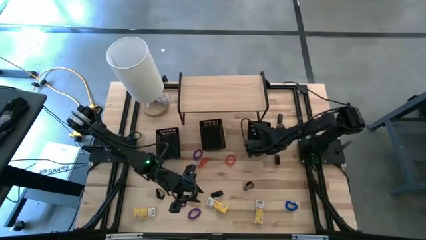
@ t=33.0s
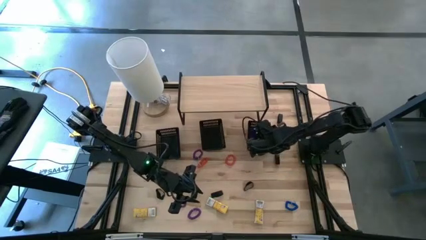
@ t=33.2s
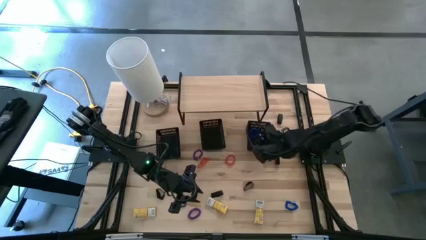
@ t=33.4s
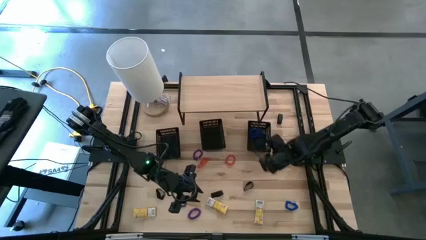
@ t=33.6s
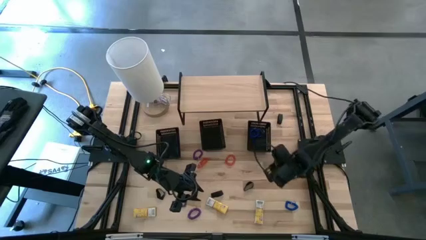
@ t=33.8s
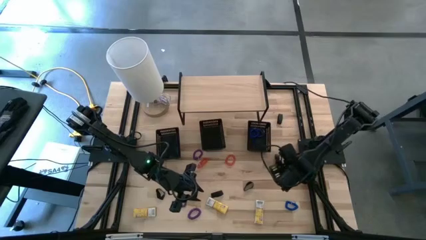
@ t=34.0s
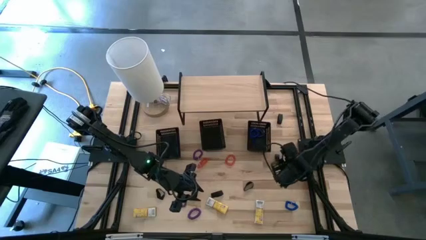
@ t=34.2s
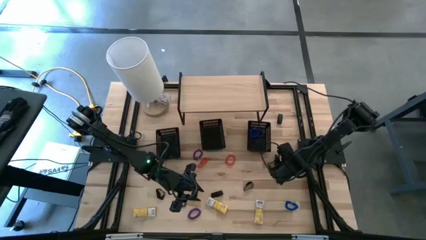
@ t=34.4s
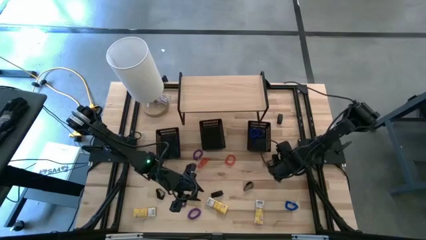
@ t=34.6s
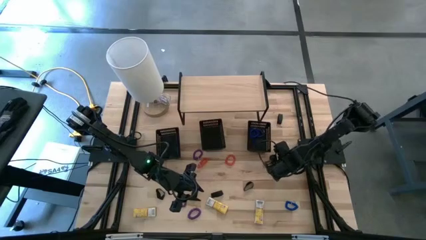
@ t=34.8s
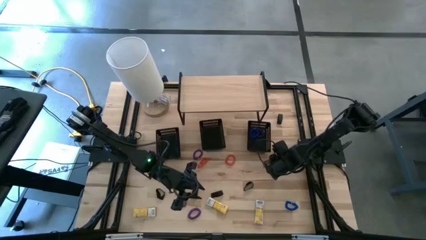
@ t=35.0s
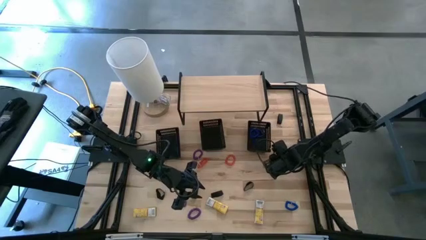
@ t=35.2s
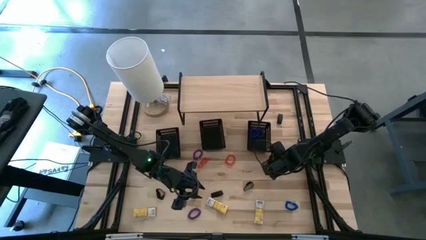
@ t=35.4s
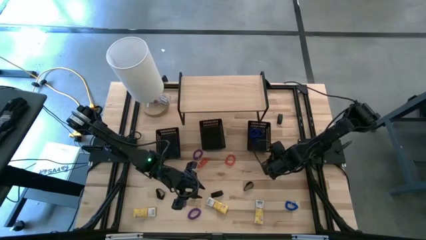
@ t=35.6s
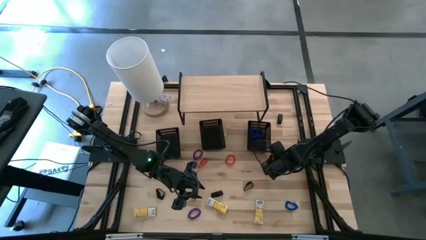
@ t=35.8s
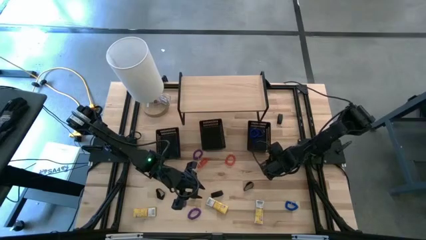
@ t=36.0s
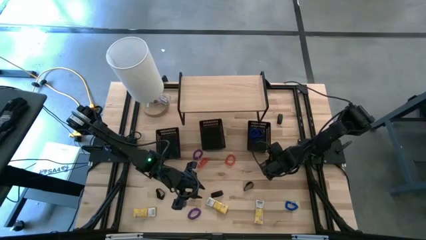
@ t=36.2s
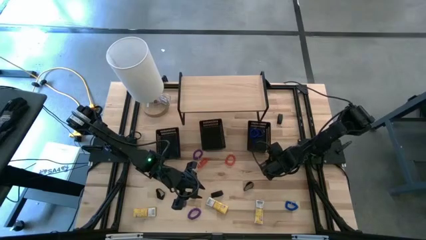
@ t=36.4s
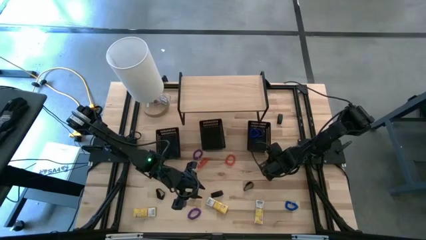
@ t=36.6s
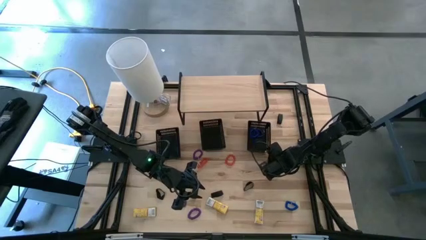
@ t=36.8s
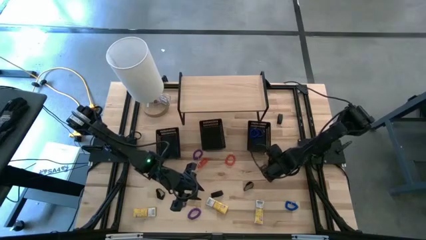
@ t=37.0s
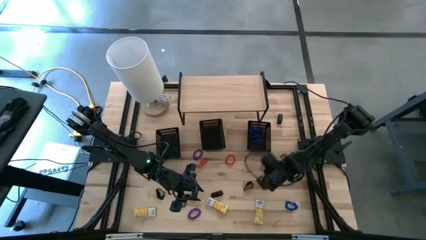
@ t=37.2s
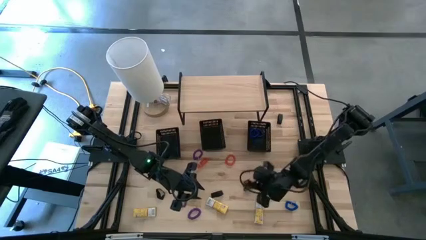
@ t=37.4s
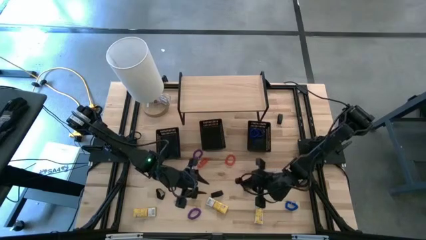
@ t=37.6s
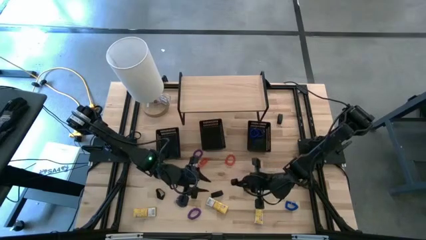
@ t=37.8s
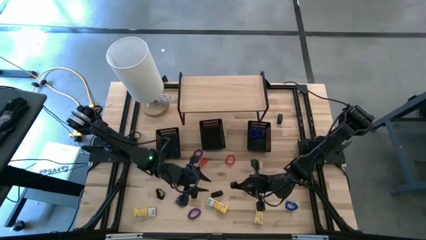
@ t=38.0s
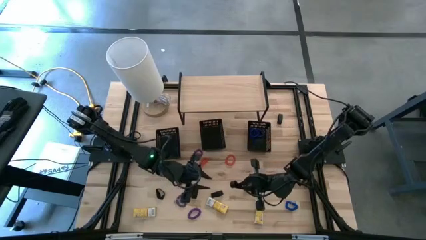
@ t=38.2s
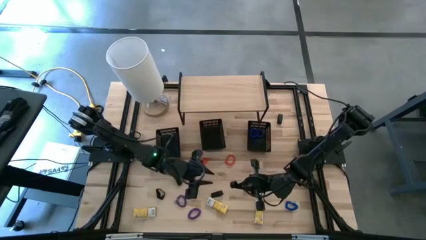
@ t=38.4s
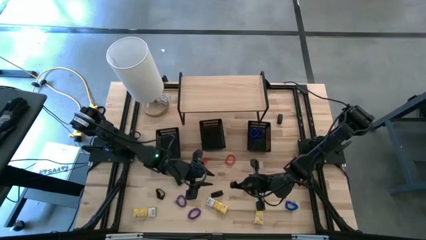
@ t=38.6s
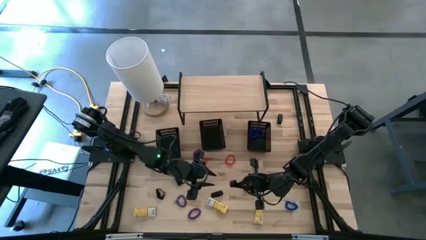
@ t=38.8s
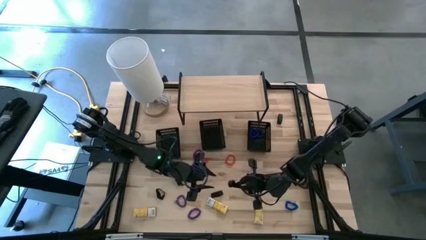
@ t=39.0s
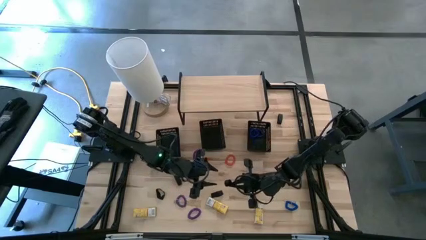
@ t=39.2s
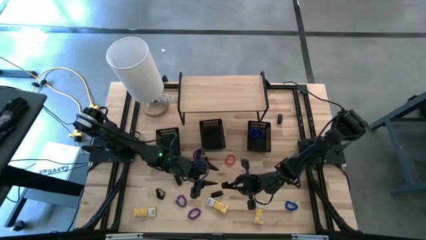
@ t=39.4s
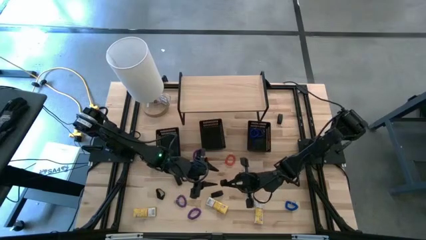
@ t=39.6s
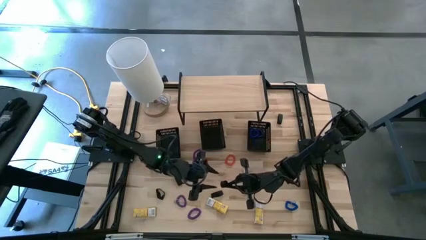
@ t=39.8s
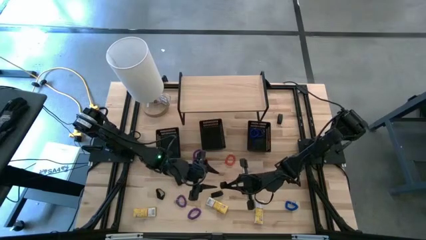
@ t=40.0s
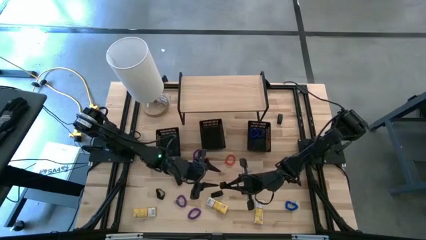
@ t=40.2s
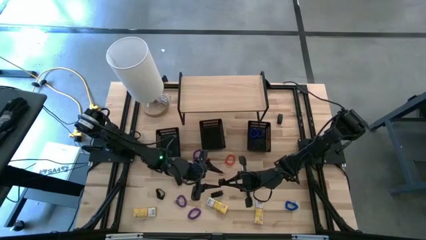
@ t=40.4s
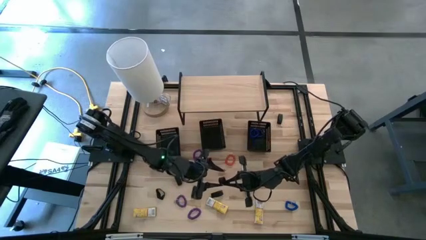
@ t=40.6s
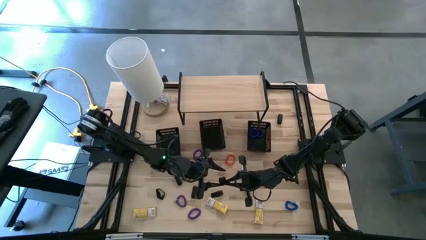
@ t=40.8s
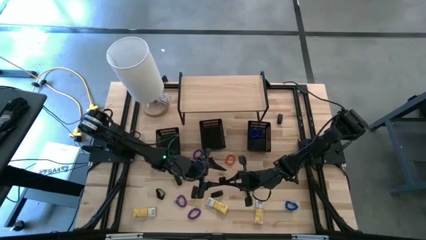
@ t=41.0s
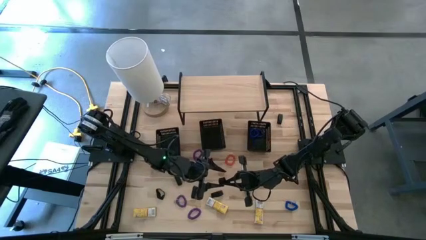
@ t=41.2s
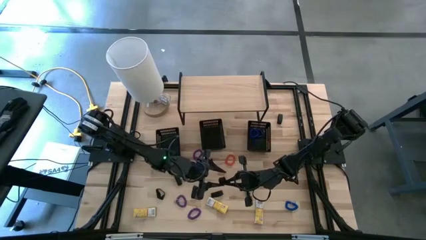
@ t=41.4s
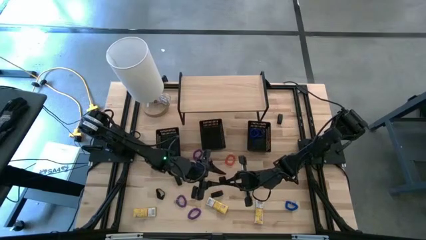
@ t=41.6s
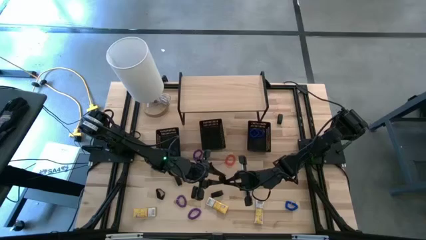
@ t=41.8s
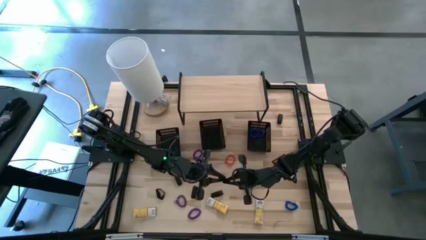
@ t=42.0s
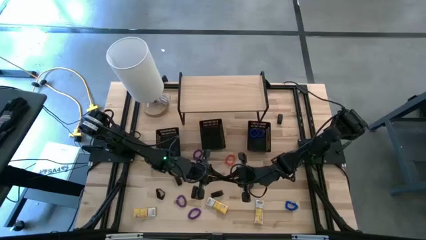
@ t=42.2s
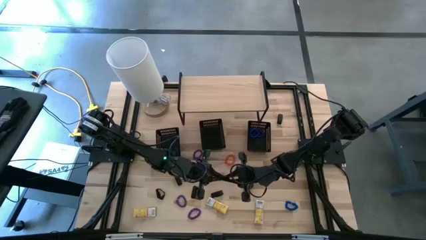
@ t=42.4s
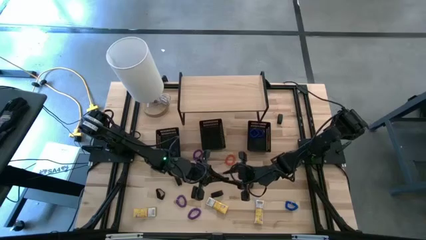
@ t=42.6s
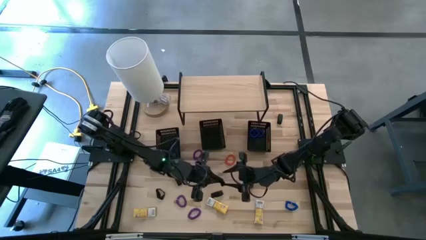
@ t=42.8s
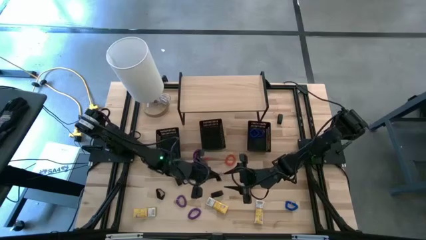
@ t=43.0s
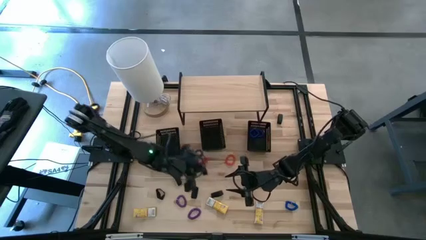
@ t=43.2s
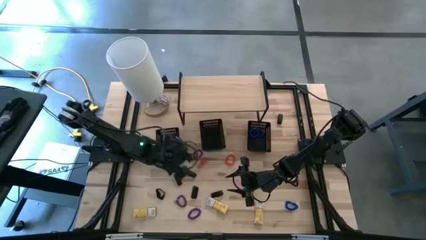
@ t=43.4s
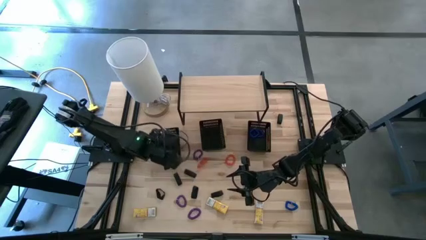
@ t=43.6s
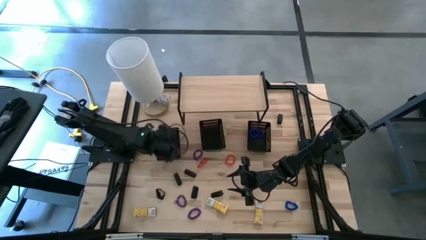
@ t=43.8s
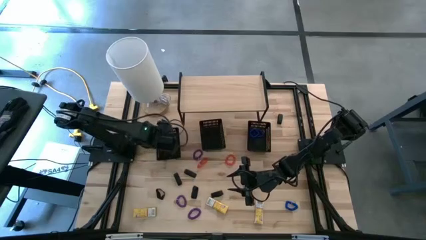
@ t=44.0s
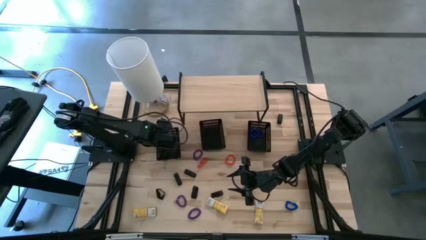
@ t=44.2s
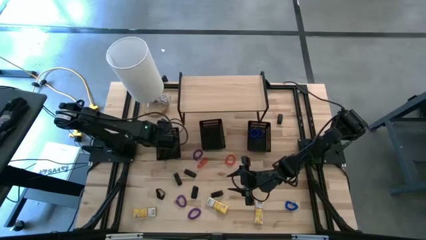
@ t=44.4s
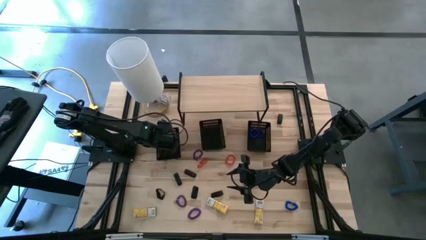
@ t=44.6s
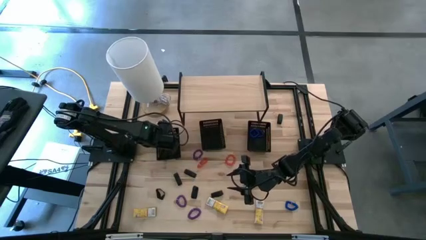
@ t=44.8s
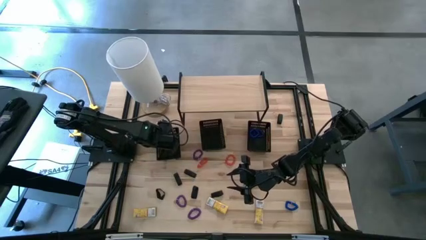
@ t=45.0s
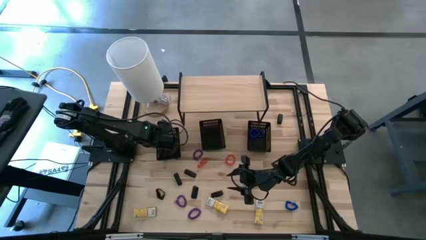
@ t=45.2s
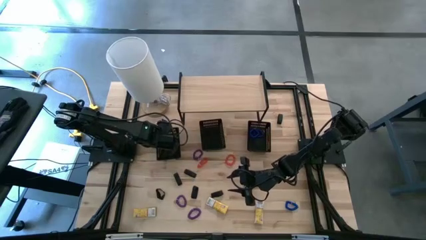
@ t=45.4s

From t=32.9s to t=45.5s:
Task: Pick & Place Office Desk Supplies
Put the black rubber band into the left black bin

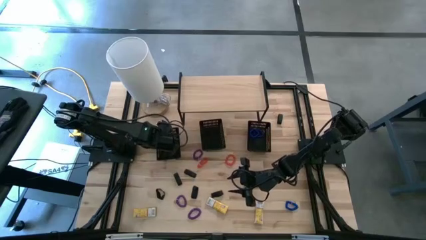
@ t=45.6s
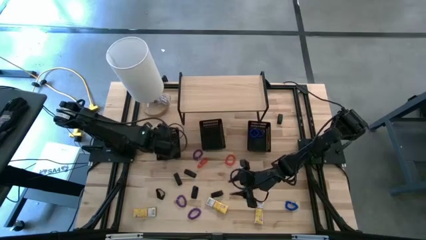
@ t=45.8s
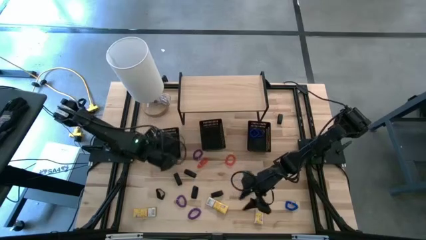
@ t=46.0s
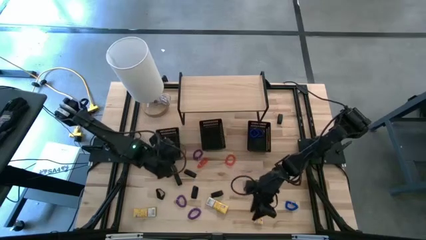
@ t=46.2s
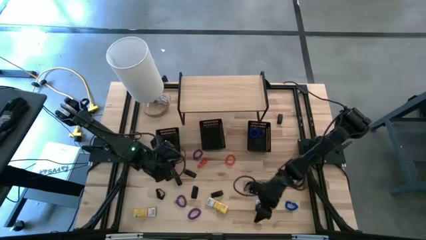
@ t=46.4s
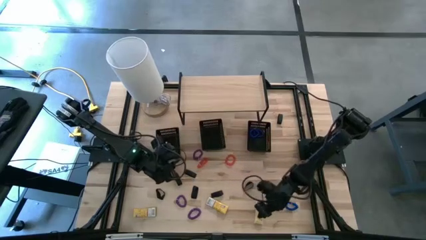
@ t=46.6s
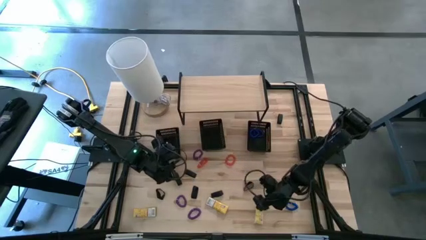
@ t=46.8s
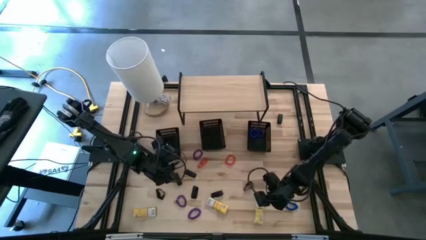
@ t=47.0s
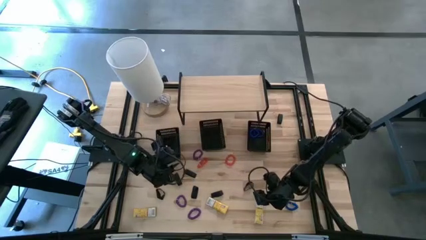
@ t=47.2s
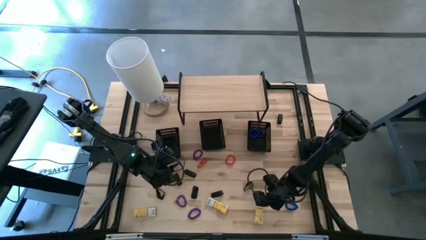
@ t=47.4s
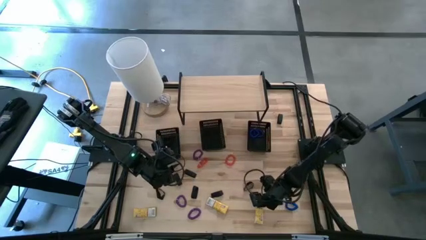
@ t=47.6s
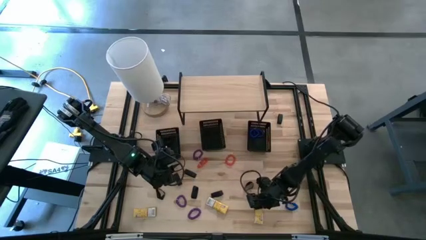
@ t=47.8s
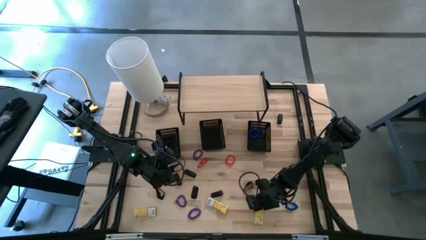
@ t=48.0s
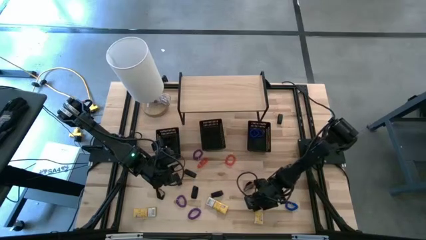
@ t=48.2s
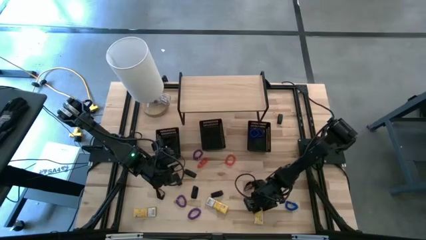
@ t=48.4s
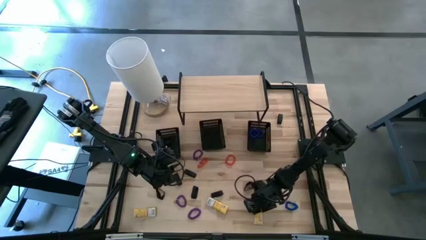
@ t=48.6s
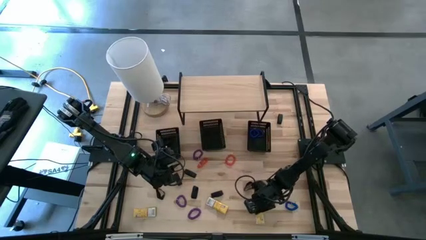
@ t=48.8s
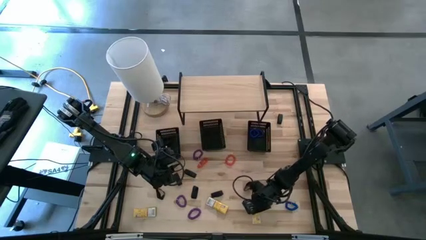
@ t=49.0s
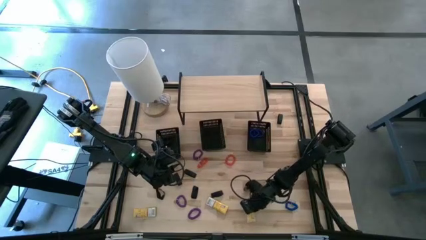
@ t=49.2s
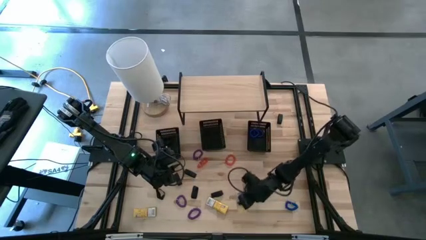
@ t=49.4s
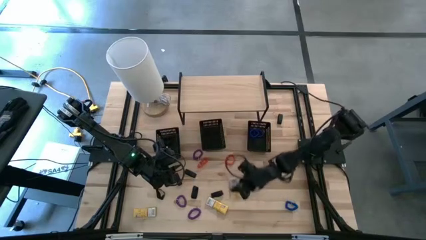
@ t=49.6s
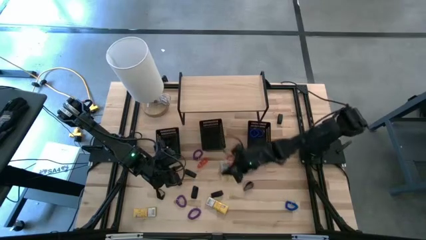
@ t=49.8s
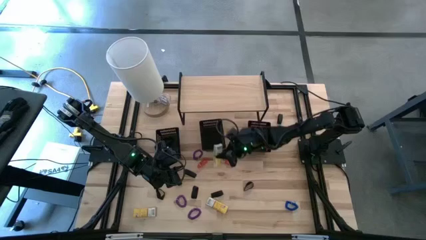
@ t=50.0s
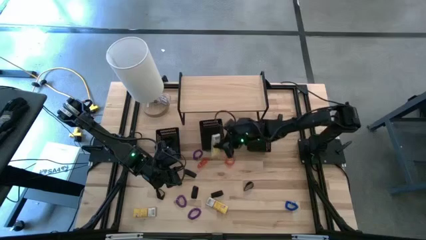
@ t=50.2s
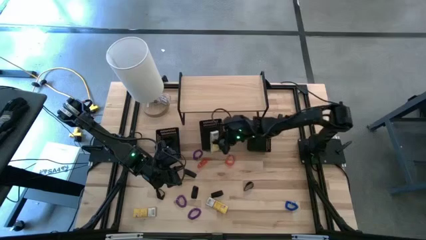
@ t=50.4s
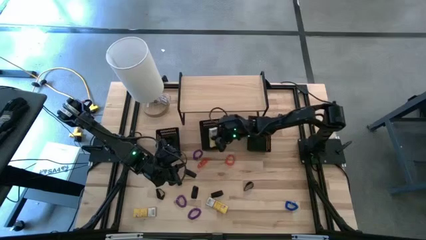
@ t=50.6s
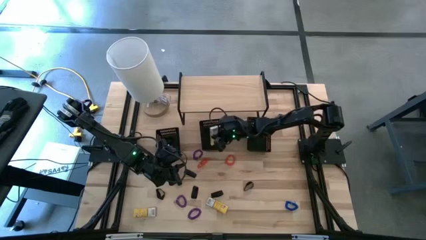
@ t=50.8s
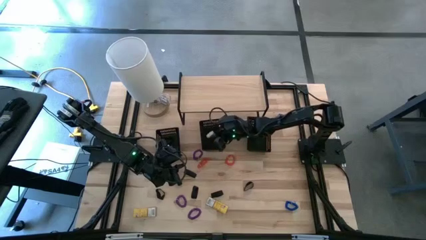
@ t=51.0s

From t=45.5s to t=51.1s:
Put the yellow crayon box into the center black bin
